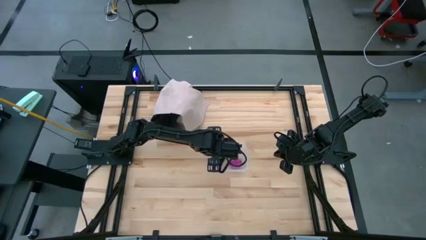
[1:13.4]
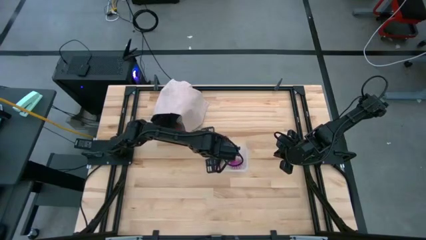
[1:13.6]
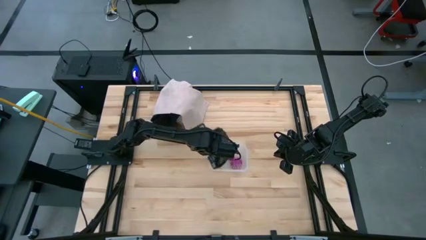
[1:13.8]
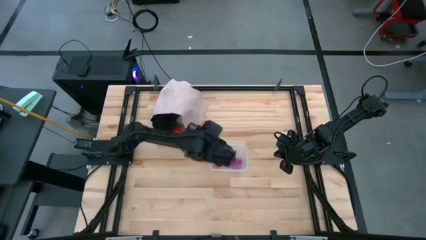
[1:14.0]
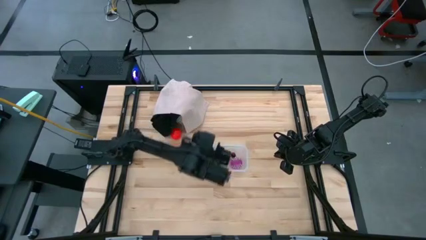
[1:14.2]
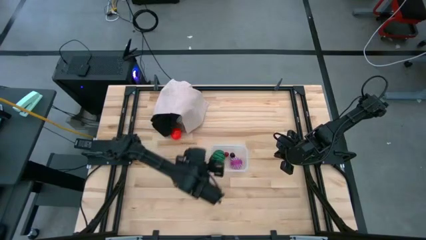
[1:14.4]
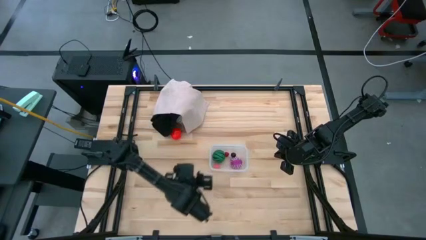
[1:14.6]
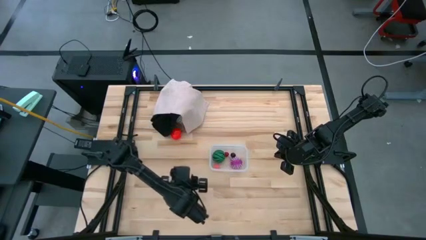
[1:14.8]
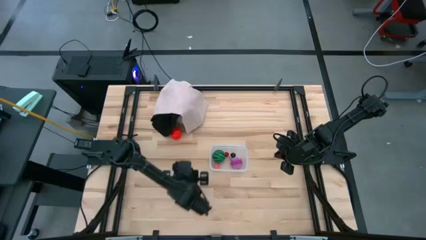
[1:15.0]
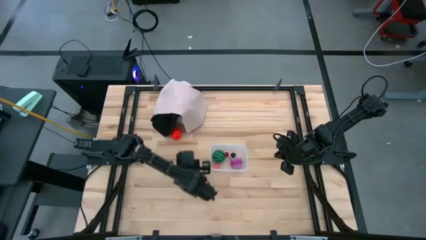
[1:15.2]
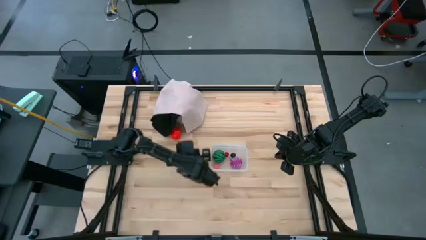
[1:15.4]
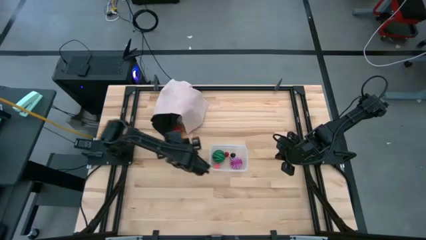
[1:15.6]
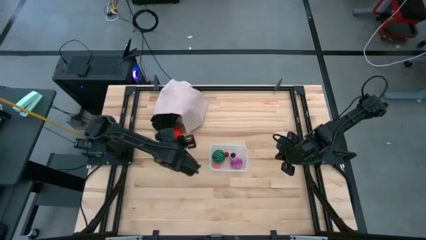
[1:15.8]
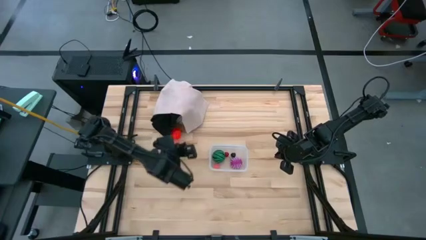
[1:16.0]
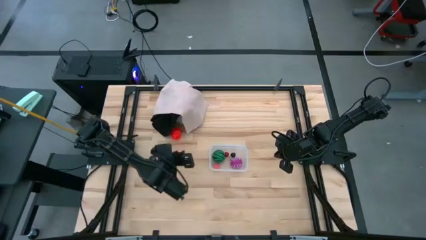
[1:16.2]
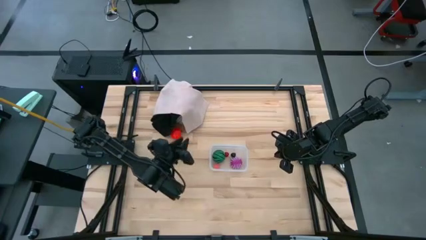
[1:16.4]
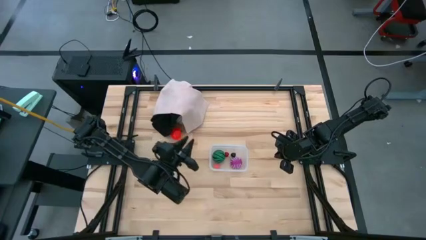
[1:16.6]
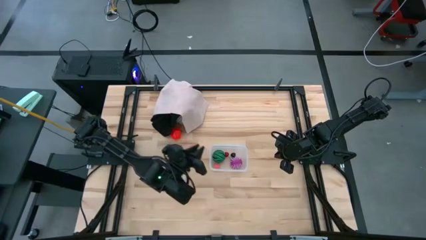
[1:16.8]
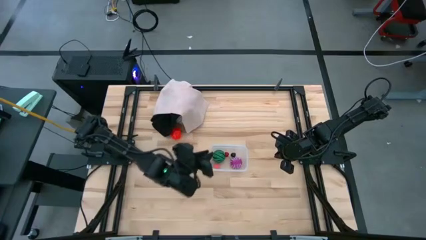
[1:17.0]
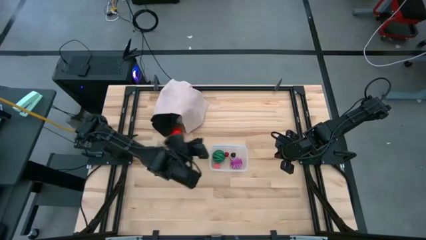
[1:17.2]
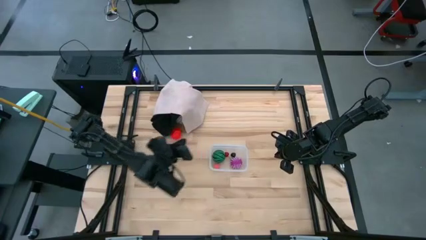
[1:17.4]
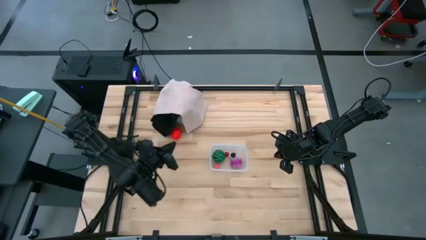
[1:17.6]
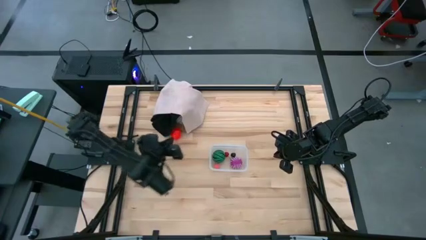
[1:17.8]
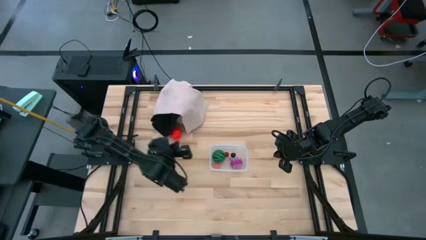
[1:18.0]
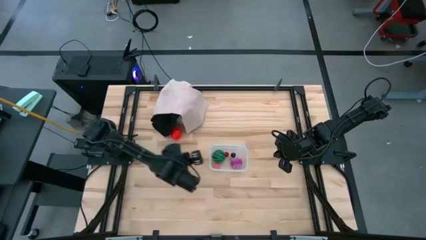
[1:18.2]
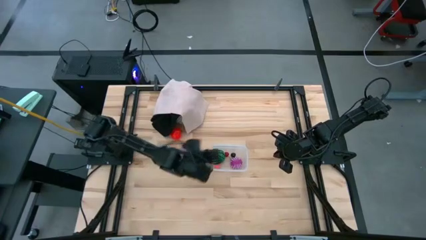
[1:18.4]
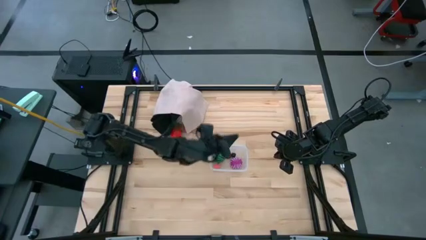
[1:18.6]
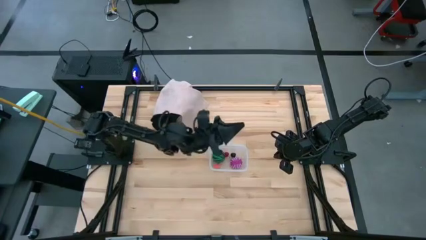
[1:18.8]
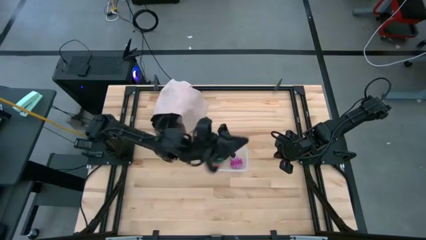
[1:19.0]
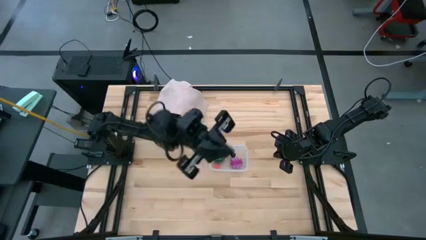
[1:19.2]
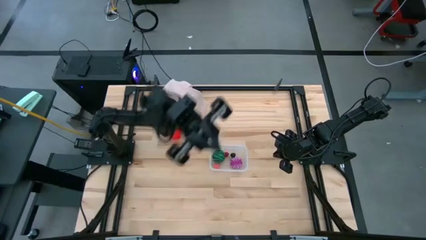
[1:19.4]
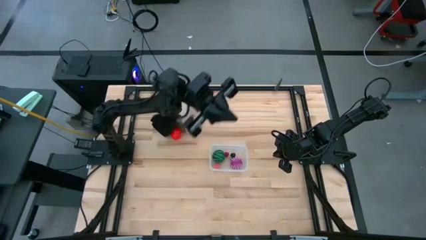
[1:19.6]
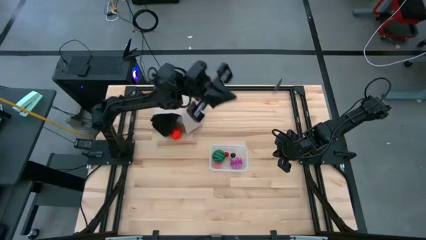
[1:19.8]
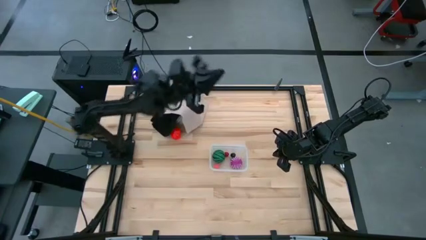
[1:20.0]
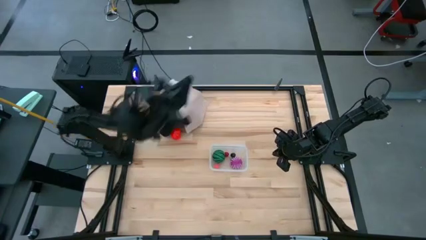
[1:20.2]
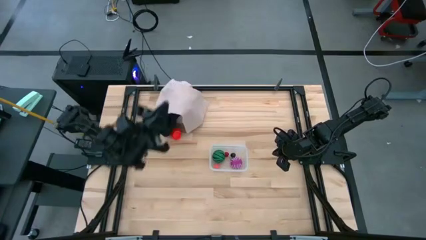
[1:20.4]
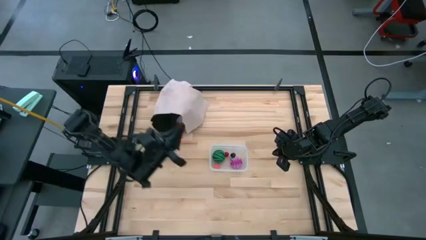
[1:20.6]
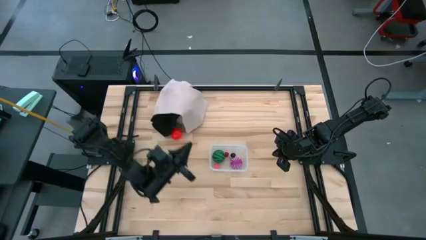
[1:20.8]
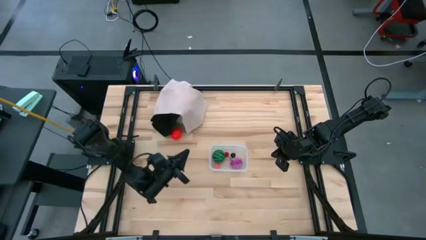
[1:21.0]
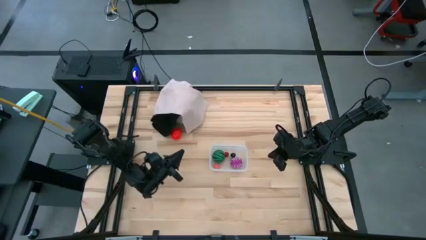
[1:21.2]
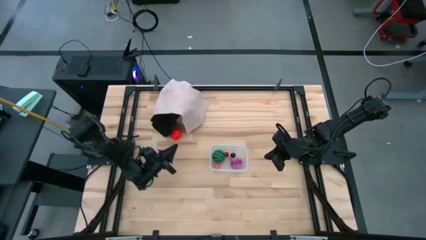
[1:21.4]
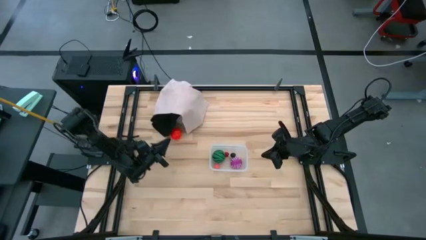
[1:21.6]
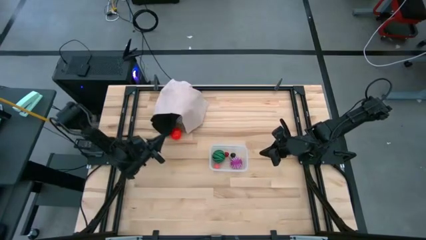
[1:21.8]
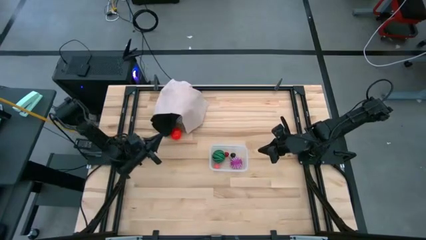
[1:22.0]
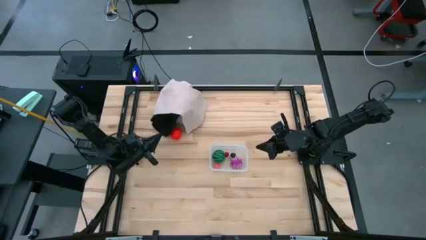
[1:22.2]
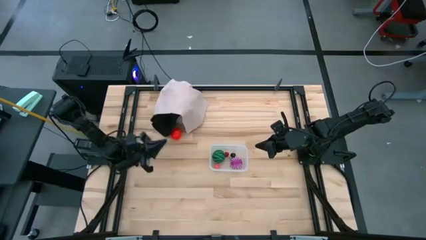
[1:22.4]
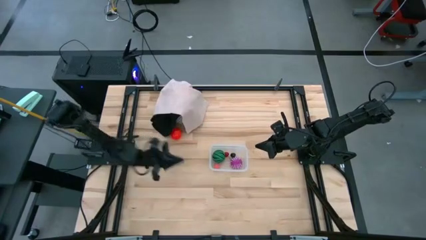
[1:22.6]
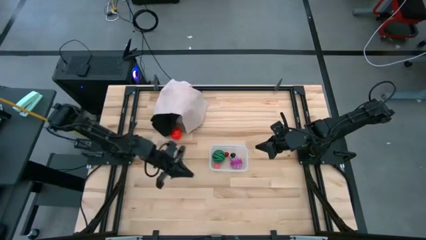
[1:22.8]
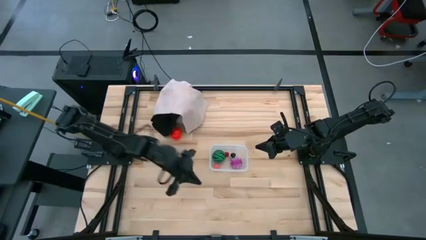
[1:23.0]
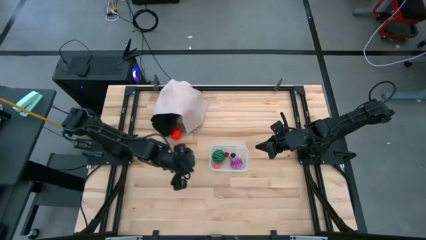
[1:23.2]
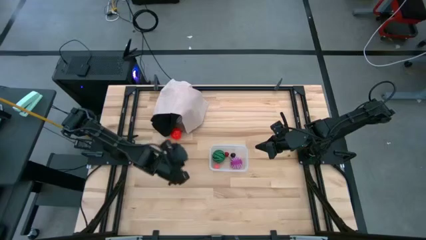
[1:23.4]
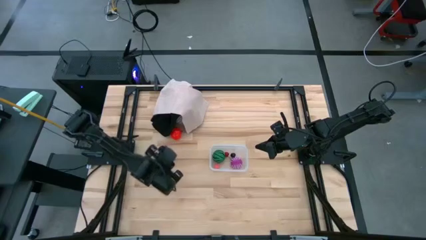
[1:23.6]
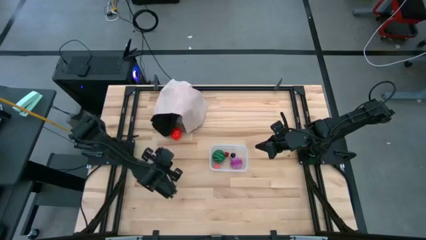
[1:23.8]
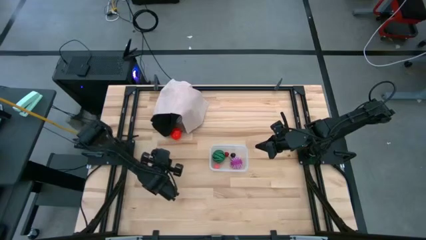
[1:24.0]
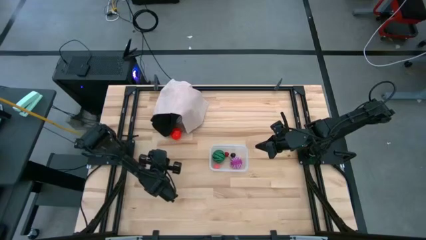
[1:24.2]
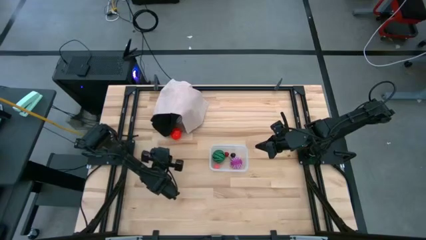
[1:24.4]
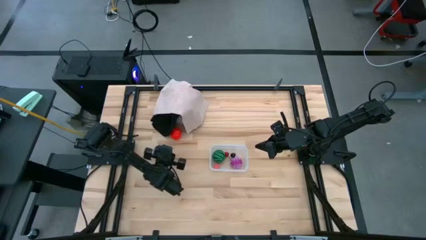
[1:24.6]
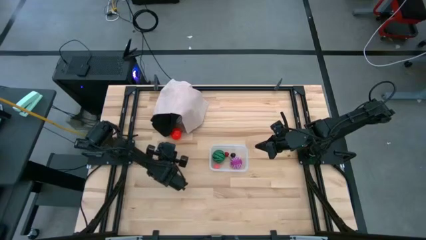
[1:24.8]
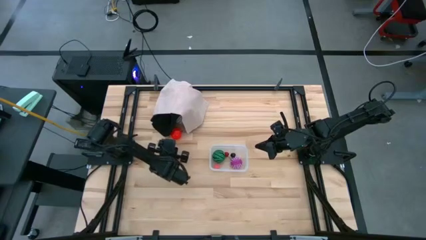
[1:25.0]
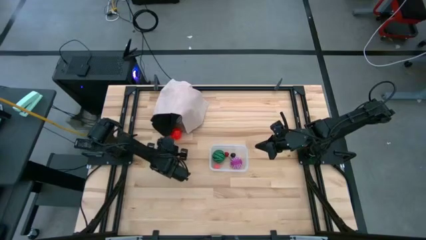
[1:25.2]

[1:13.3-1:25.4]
Task: Pick and placing Produce into tupperware
Put the apple into the transparent bin
